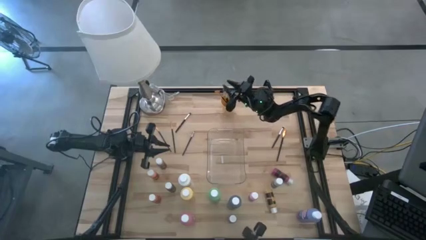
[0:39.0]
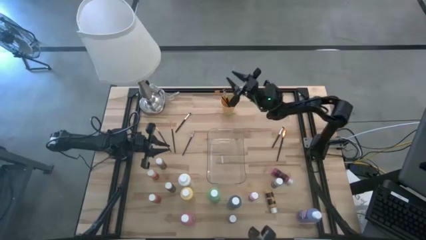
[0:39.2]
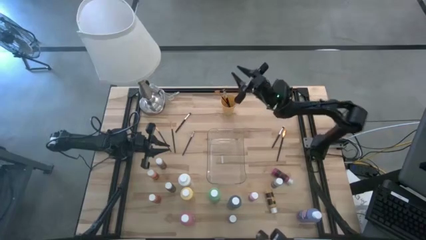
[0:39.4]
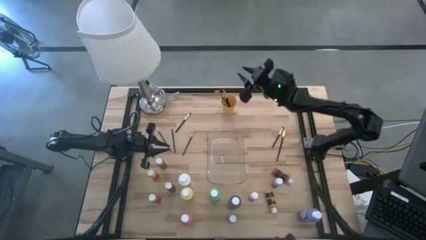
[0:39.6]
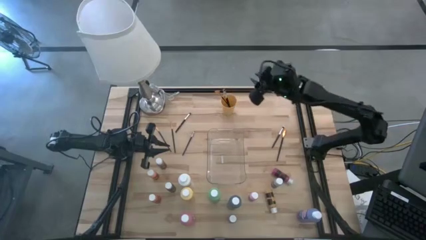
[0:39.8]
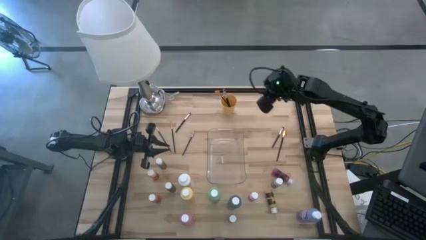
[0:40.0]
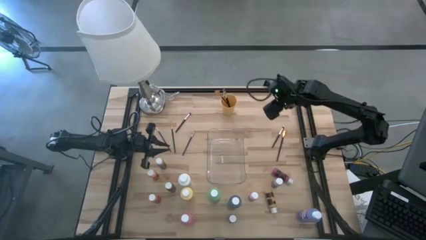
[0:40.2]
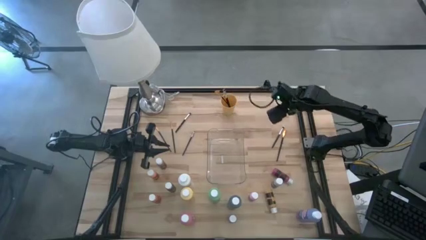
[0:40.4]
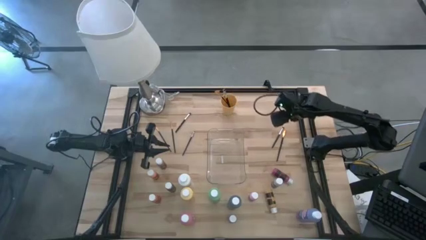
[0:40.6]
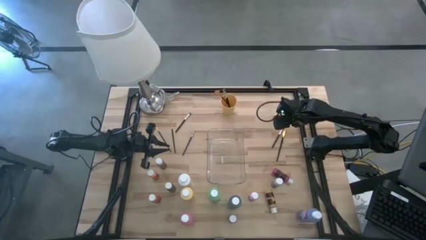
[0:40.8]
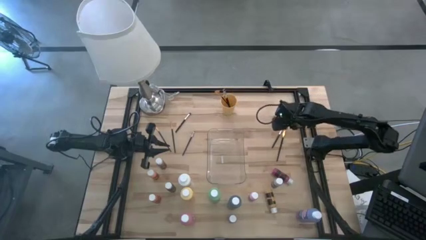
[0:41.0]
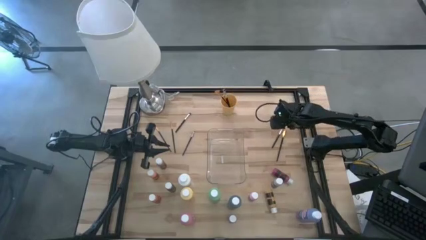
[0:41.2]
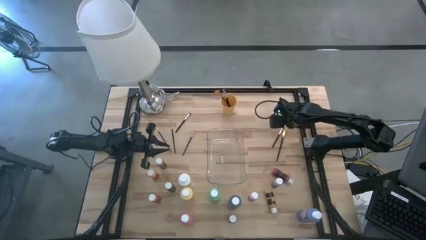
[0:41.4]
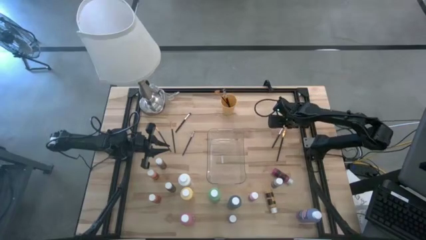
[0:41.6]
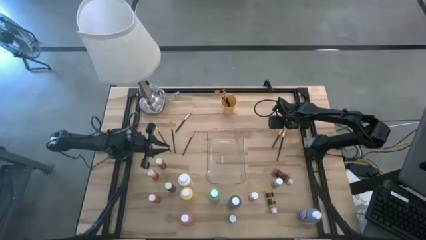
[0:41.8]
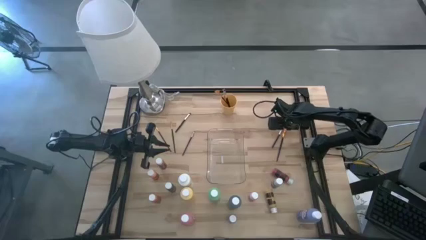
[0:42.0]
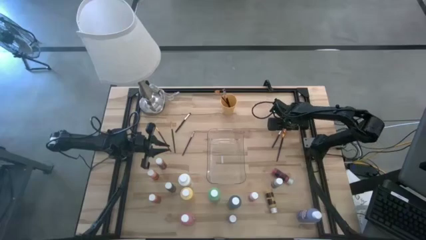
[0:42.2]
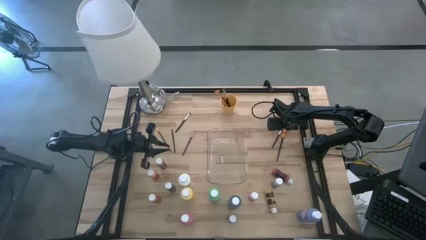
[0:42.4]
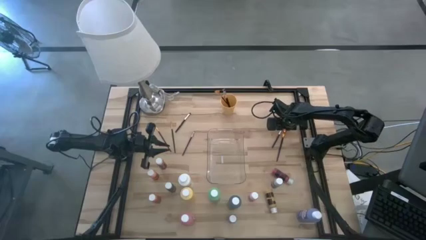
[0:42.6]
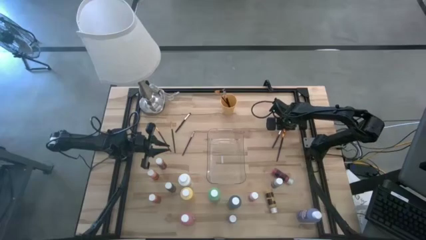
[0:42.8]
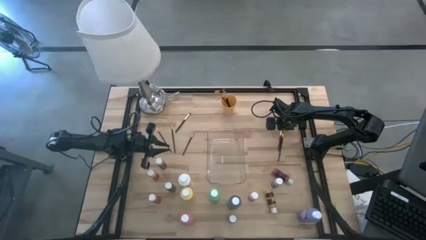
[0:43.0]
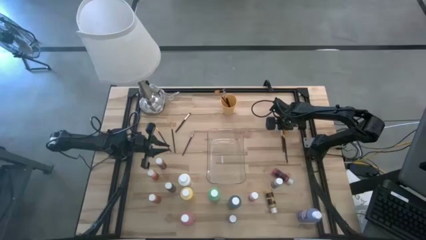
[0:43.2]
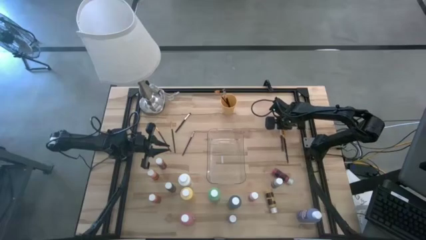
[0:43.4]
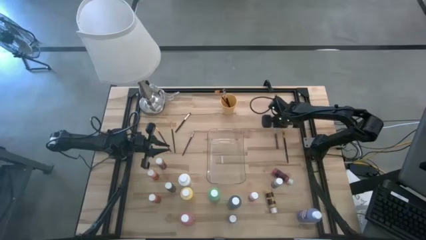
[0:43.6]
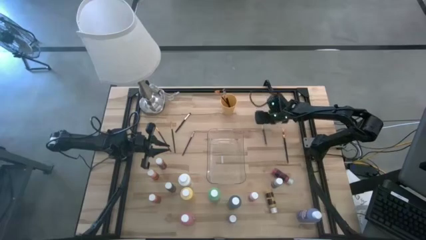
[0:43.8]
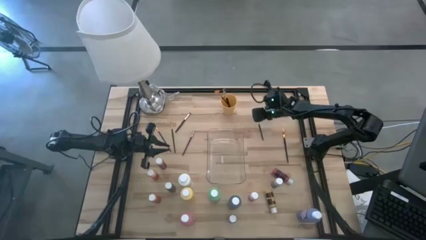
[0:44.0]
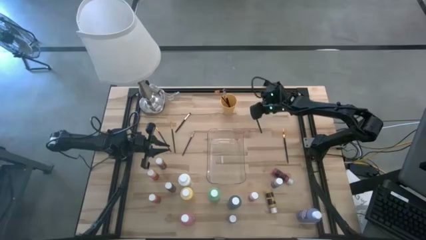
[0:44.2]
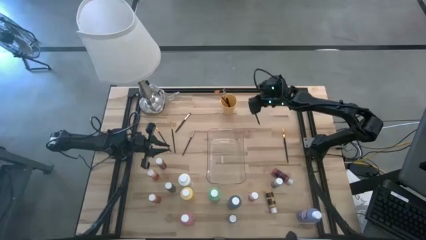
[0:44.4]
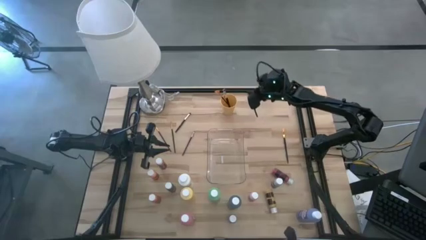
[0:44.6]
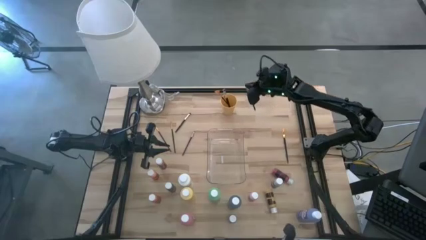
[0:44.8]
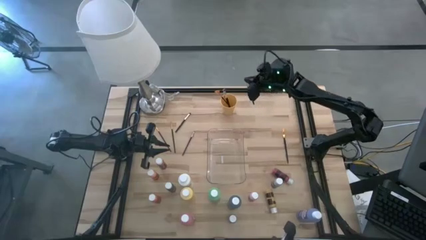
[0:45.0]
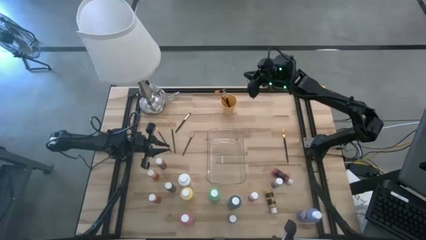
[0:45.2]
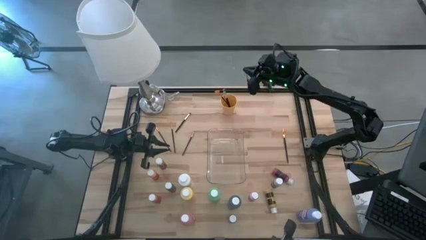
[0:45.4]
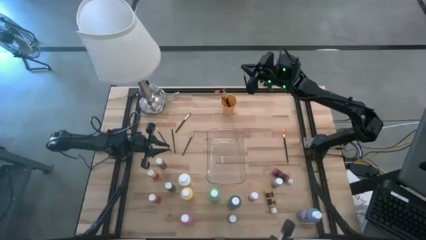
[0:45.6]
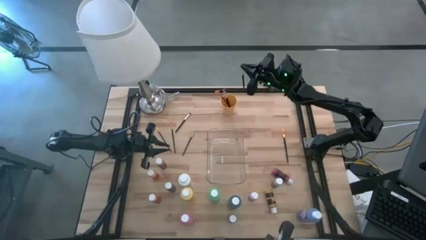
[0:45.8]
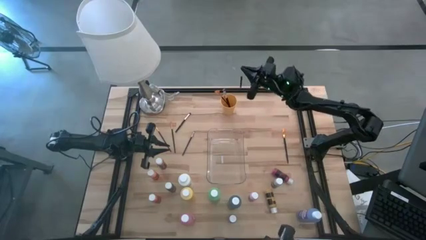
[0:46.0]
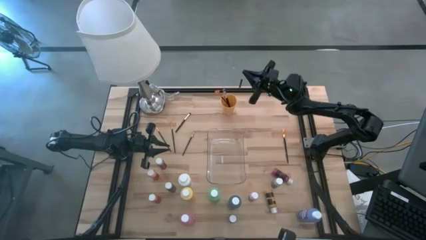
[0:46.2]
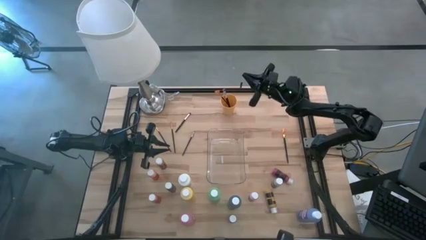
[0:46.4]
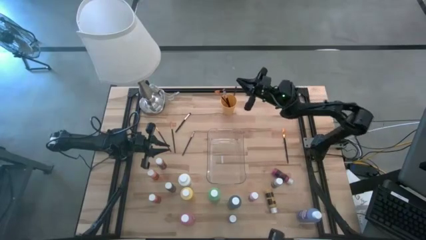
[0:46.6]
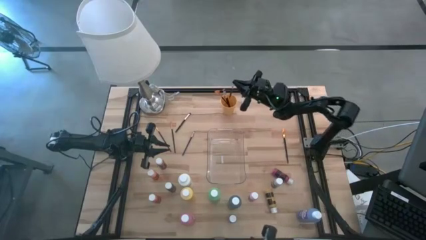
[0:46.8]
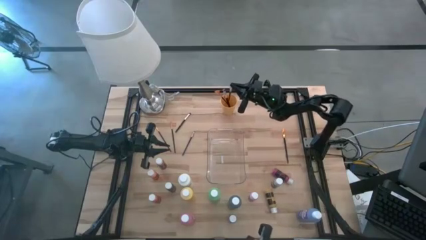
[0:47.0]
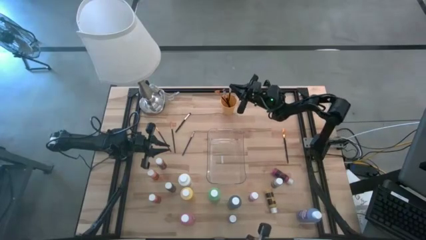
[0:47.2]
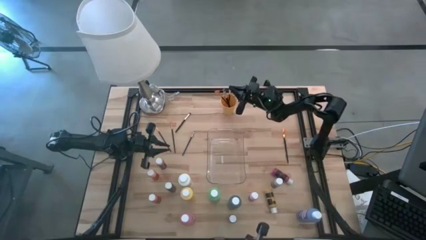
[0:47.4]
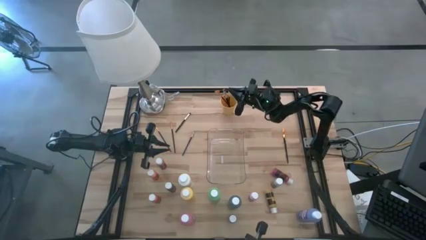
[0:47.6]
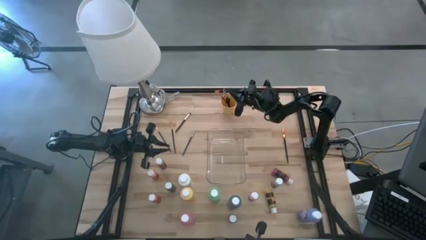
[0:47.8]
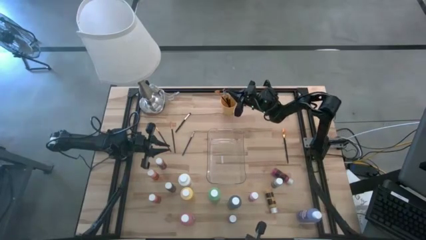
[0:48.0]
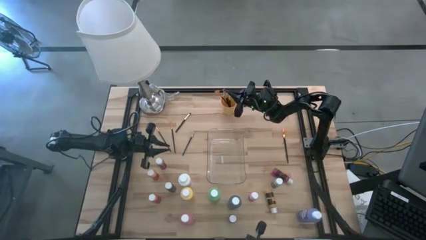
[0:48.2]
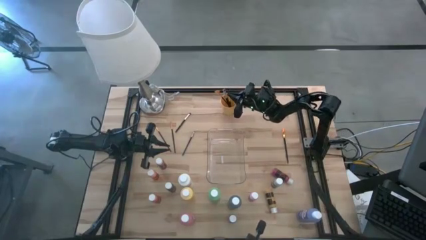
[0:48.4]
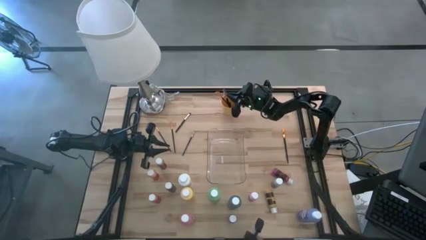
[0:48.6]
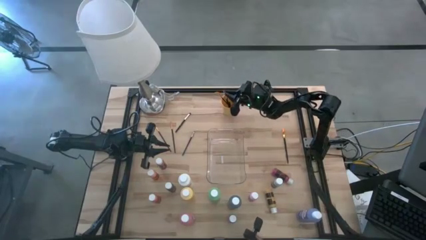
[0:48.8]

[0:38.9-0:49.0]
Task: Pick & Place Paint Supplies
Put the silver paint brush into the yellow cup

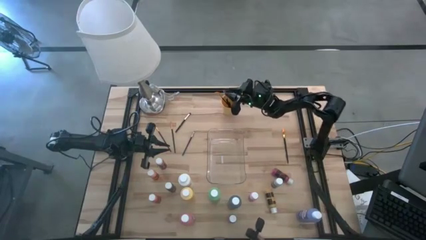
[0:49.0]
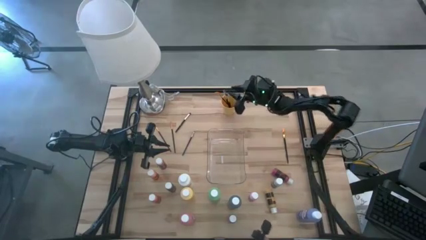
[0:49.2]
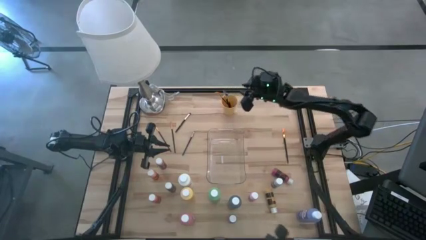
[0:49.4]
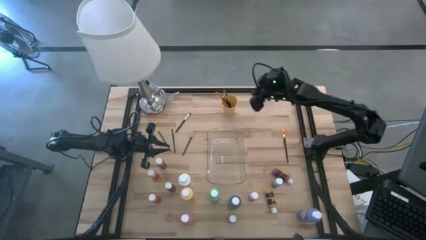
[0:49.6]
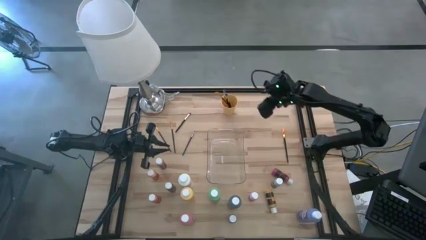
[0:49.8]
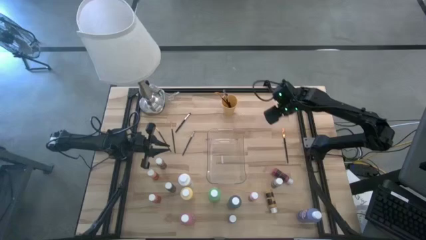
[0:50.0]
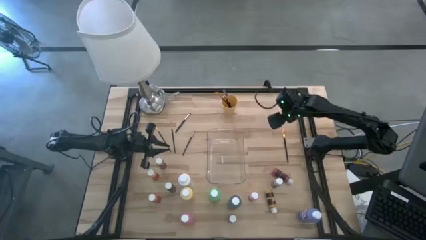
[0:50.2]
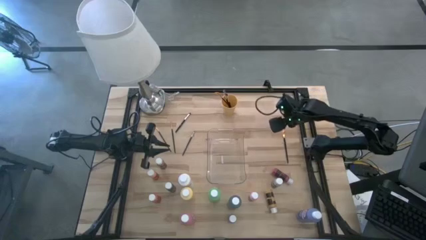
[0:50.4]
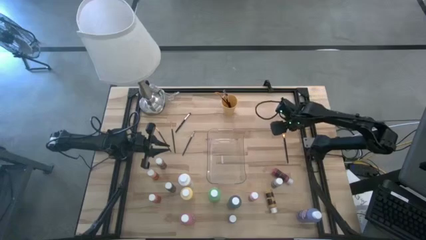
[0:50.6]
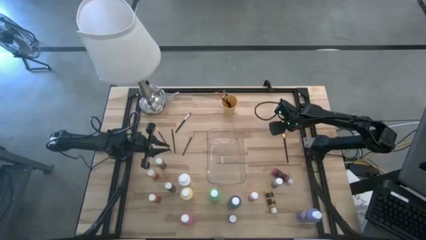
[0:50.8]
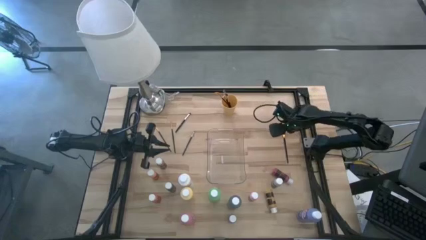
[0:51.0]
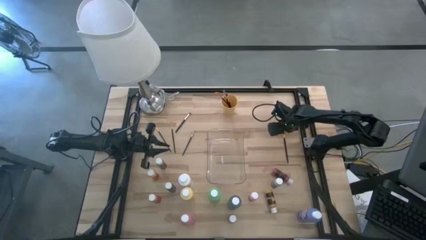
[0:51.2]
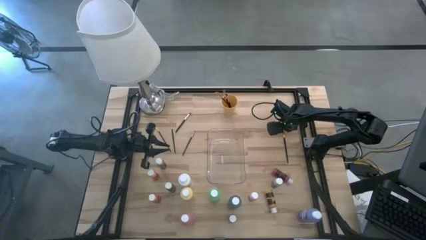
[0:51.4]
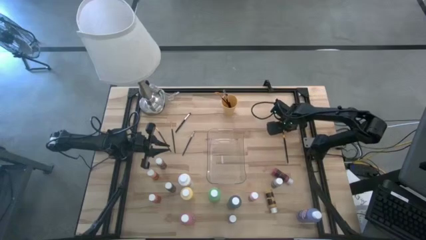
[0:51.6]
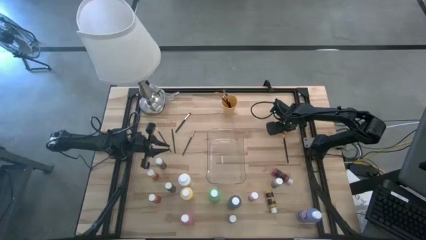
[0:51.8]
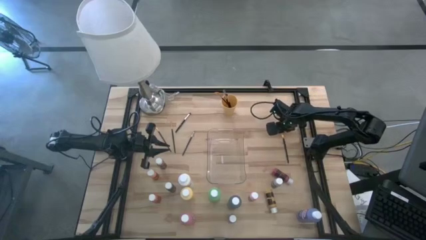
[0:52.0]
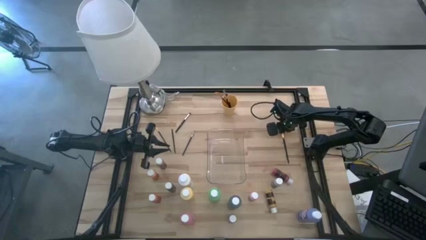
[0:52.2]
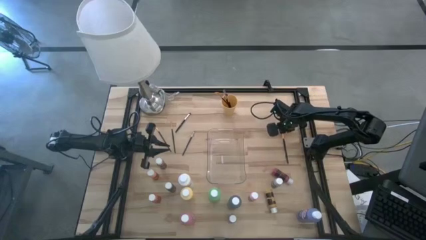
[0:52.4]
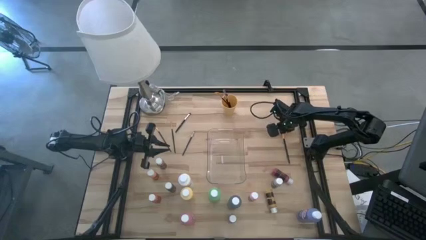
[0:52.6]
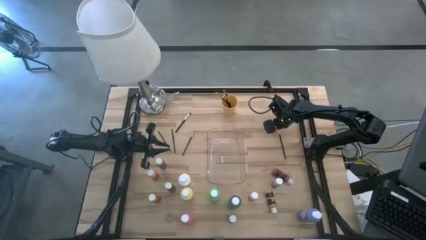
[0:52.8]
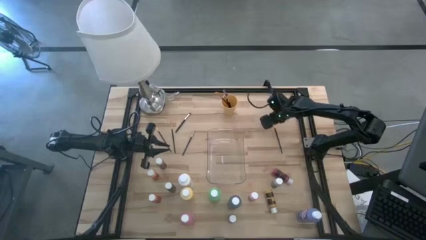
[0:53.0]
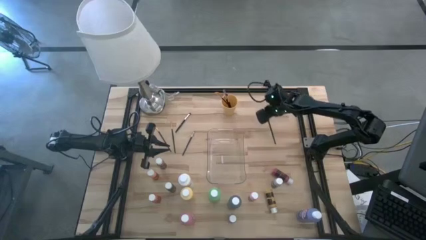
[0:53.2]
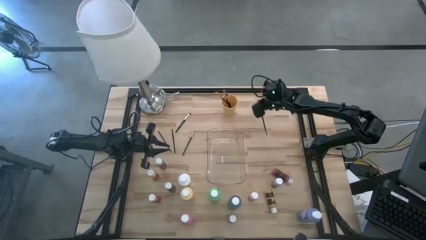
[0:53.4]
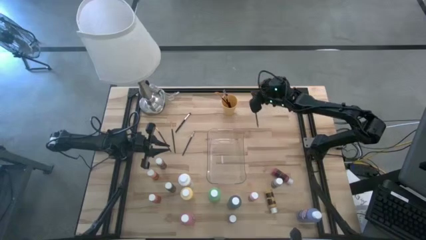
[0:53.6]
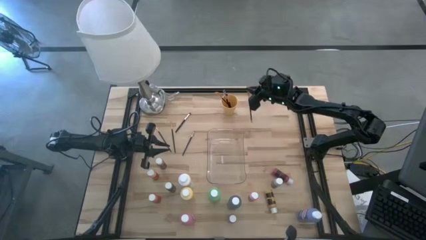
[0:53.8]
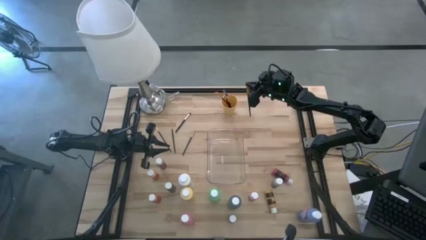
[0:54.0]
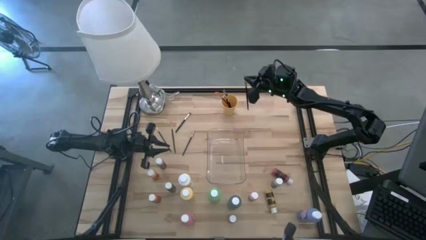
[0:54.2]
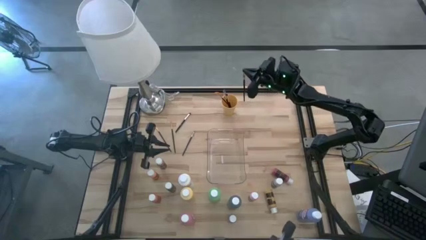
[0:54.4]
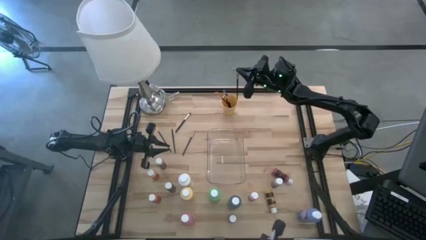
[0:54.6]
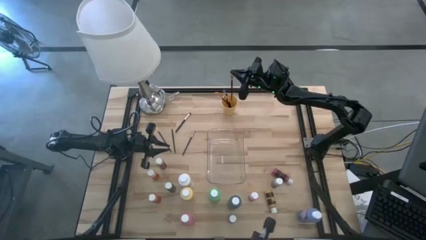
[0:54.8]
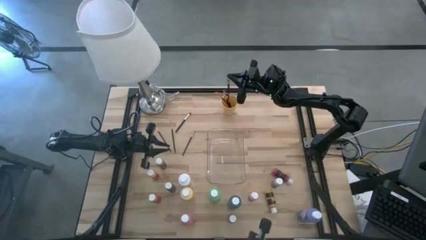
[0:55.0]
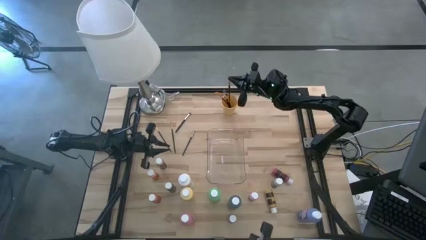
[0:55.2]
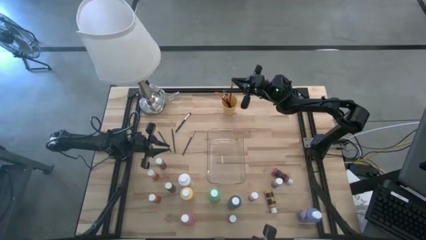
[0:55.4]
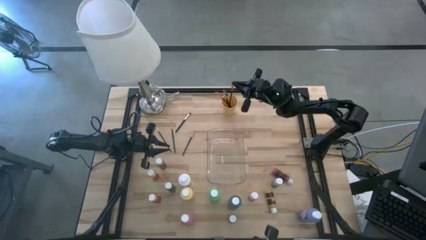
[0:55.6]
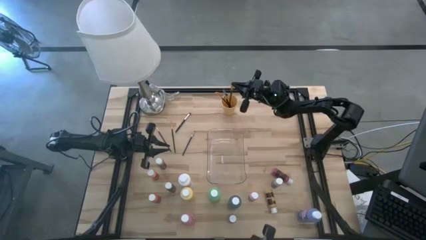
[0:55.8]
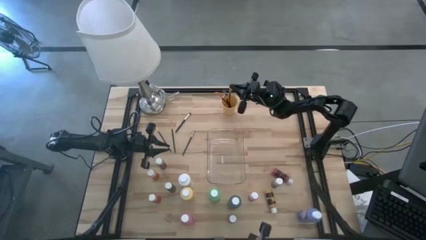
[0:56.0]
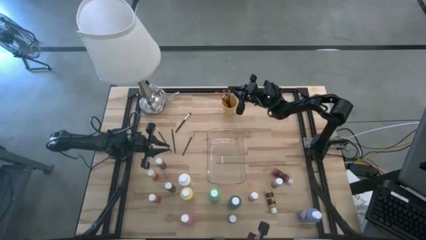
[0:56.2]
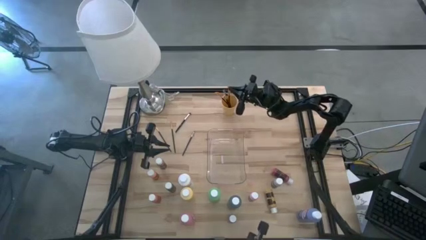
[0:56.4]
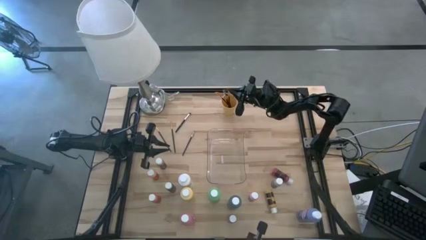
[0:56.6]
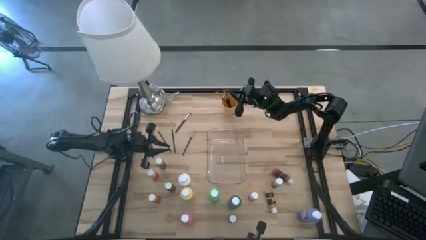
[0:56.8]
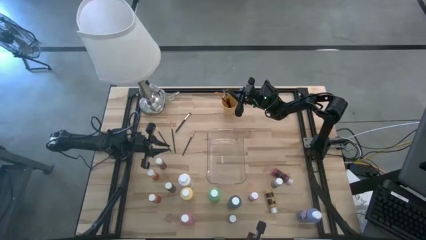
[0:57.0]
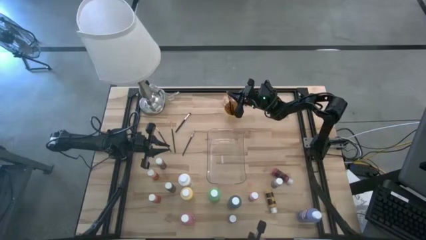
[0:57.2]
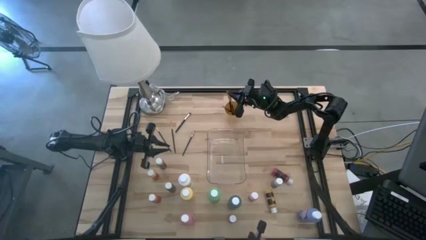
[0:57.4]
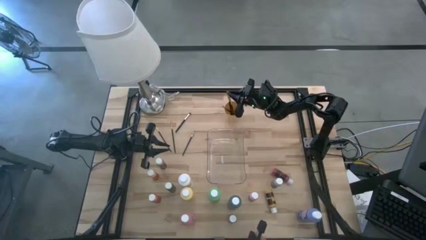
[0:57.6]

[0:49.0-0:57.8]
Put the gold paint brush into the yellow cup
